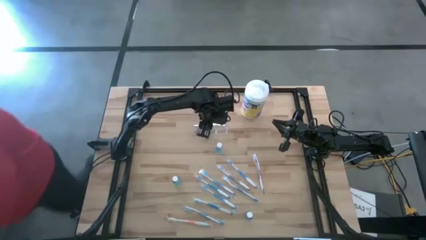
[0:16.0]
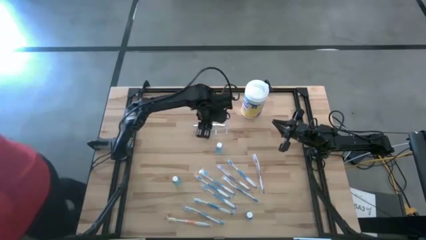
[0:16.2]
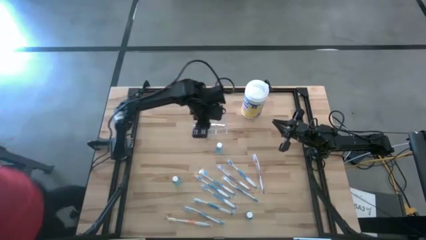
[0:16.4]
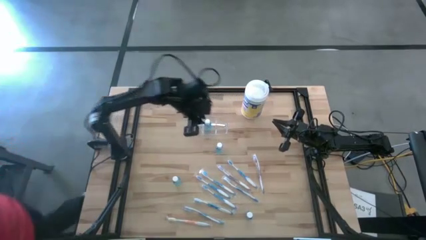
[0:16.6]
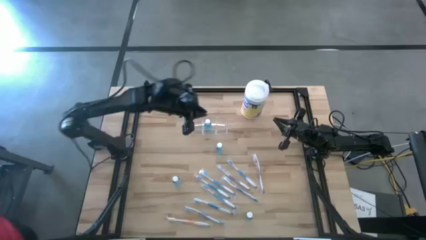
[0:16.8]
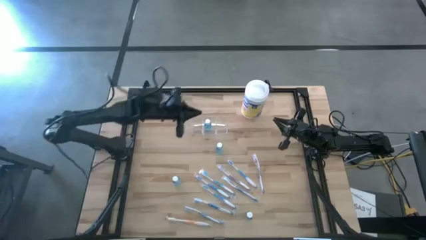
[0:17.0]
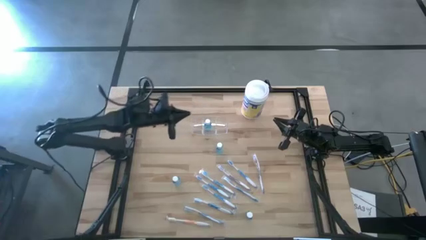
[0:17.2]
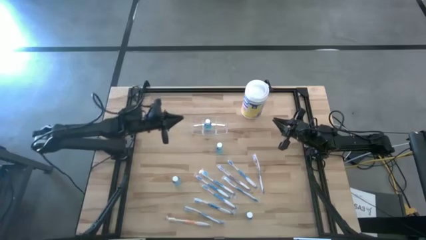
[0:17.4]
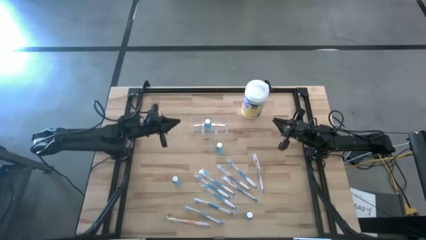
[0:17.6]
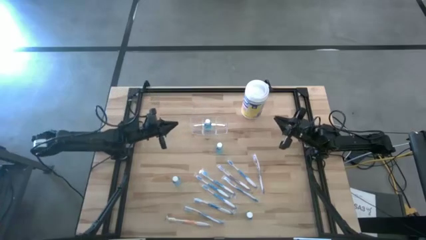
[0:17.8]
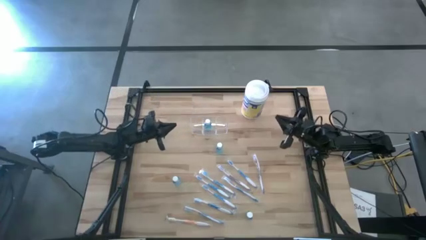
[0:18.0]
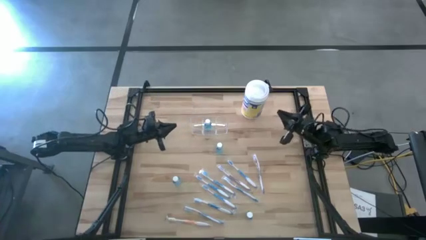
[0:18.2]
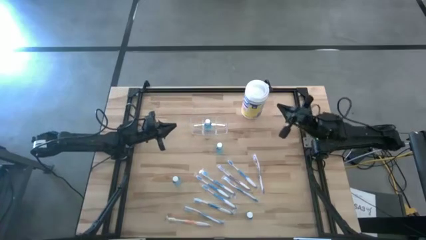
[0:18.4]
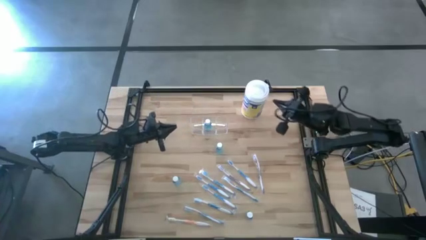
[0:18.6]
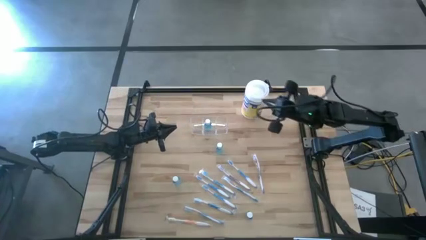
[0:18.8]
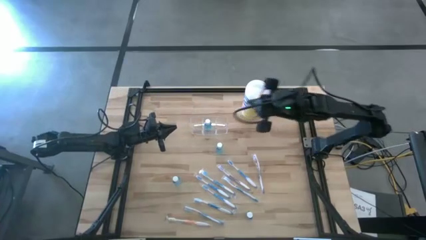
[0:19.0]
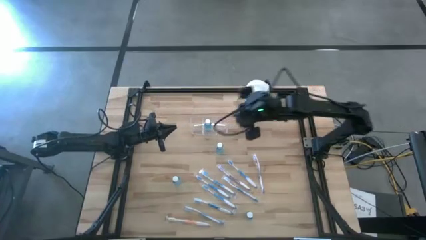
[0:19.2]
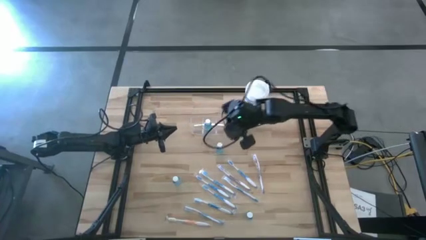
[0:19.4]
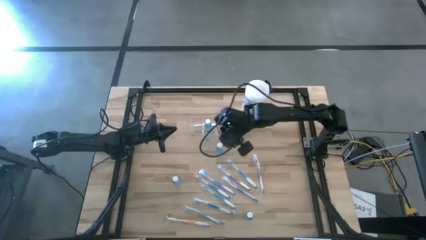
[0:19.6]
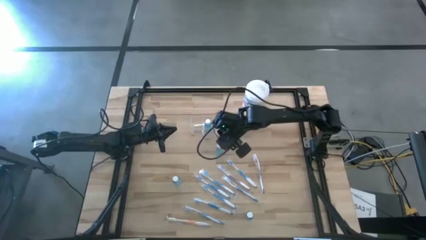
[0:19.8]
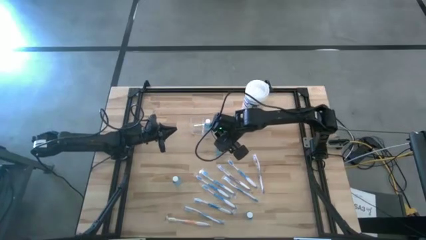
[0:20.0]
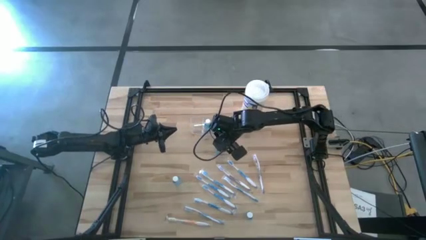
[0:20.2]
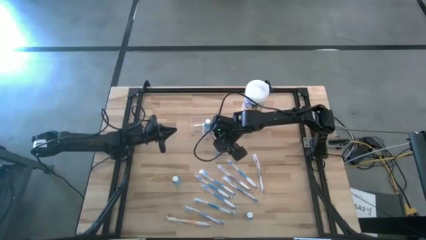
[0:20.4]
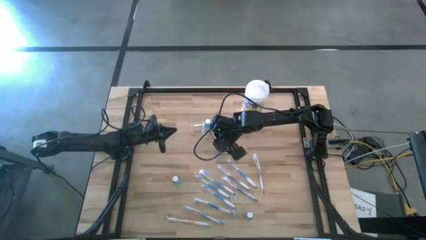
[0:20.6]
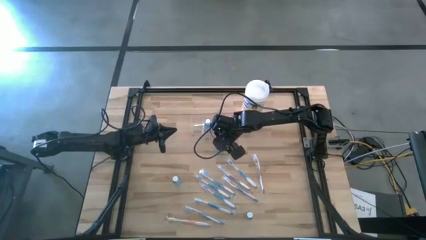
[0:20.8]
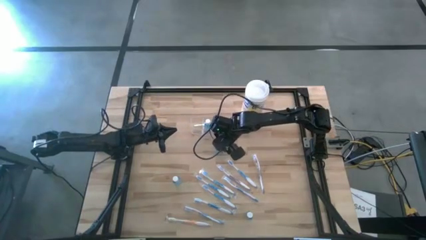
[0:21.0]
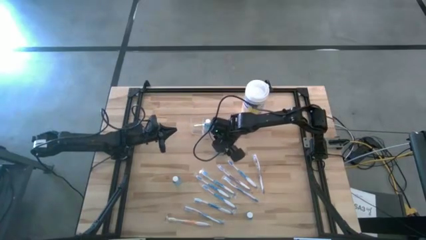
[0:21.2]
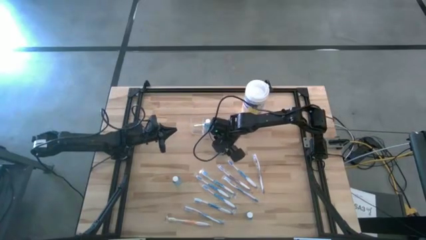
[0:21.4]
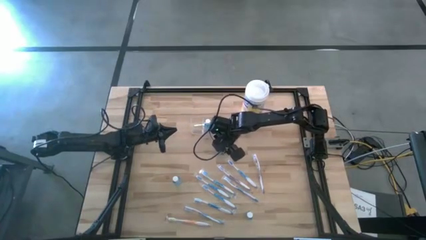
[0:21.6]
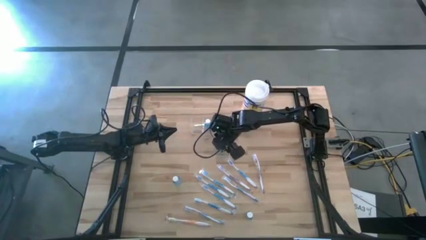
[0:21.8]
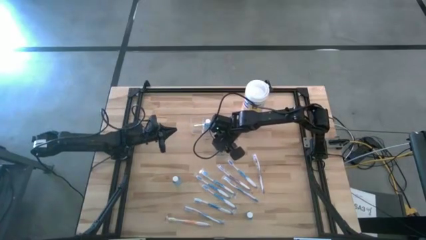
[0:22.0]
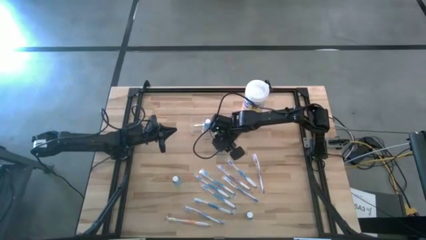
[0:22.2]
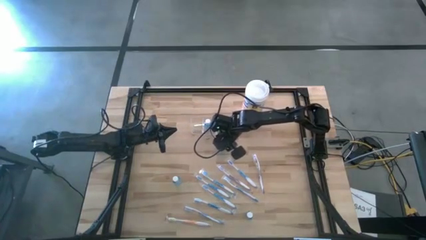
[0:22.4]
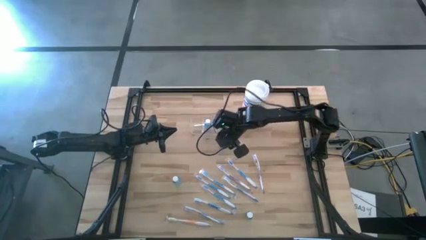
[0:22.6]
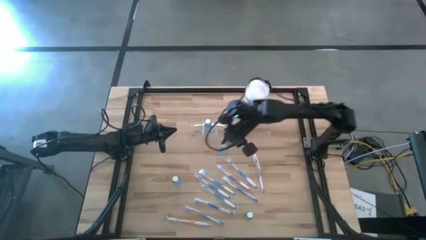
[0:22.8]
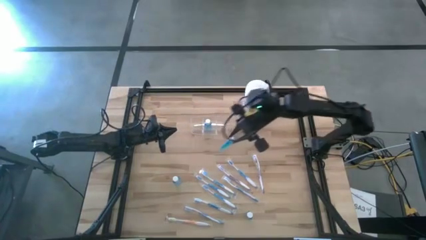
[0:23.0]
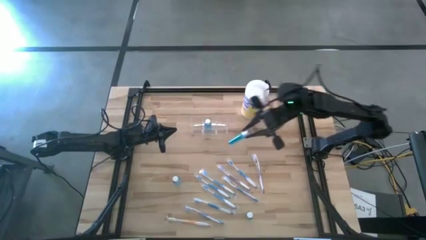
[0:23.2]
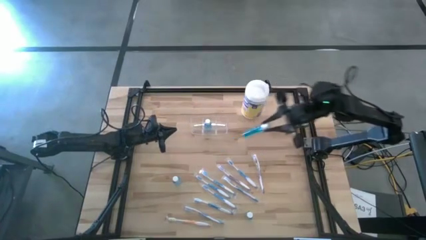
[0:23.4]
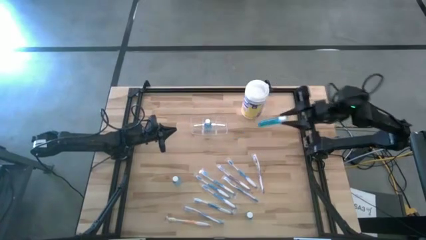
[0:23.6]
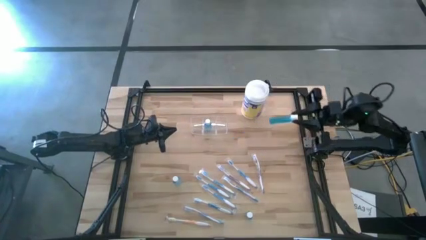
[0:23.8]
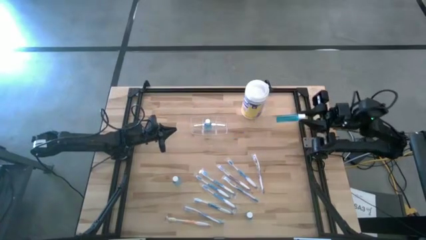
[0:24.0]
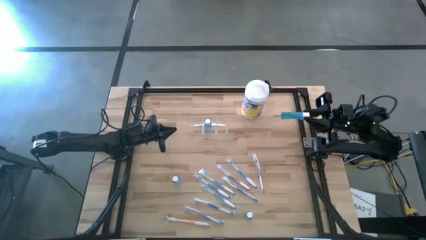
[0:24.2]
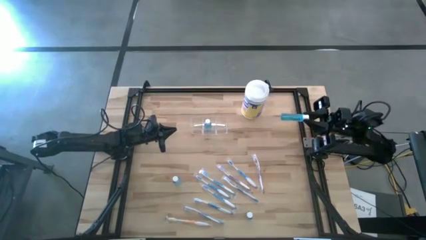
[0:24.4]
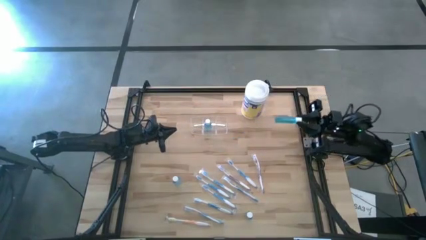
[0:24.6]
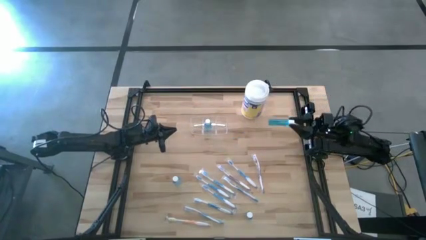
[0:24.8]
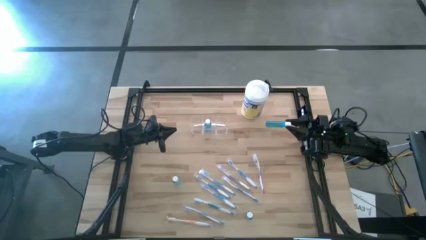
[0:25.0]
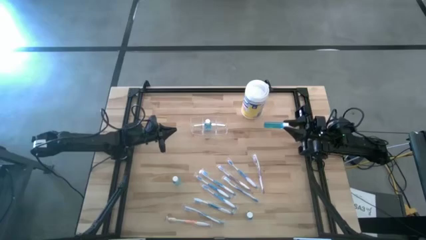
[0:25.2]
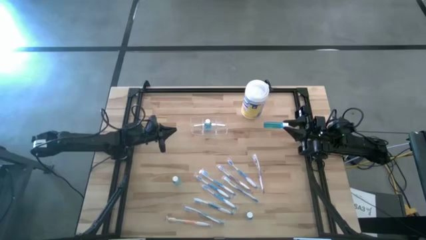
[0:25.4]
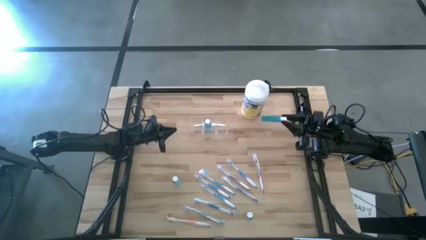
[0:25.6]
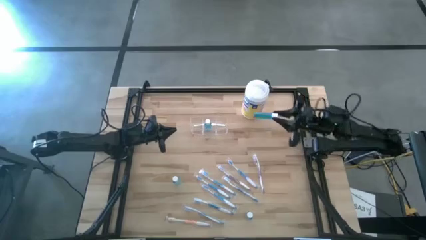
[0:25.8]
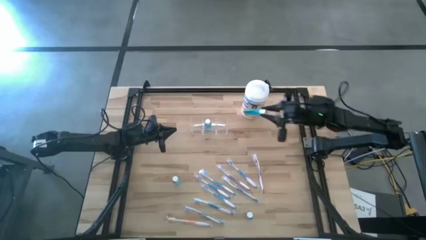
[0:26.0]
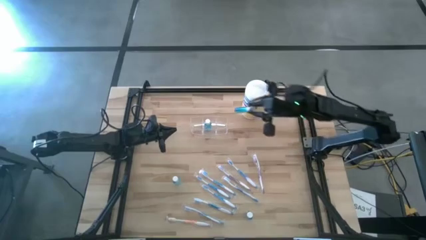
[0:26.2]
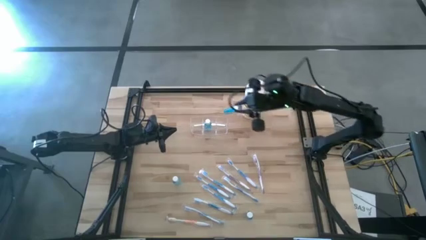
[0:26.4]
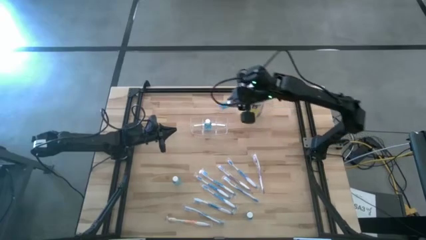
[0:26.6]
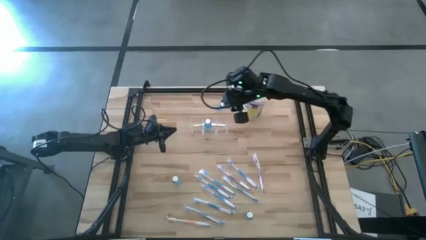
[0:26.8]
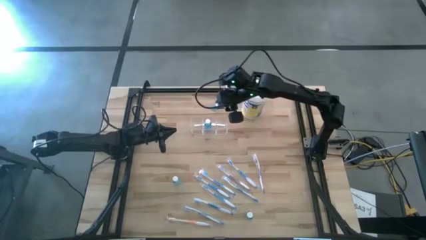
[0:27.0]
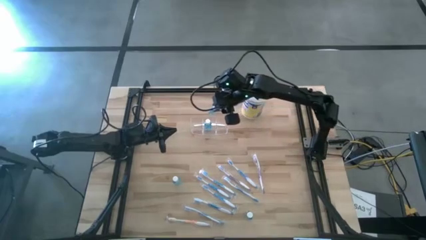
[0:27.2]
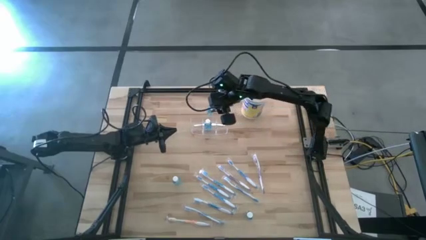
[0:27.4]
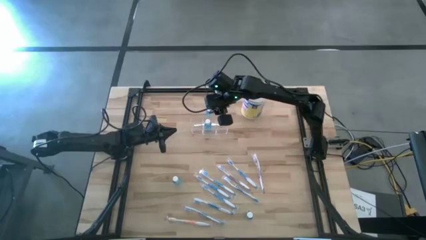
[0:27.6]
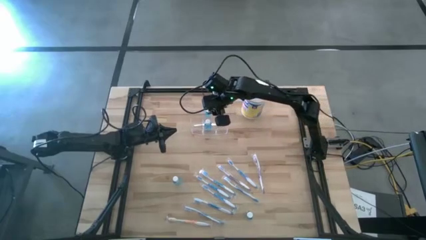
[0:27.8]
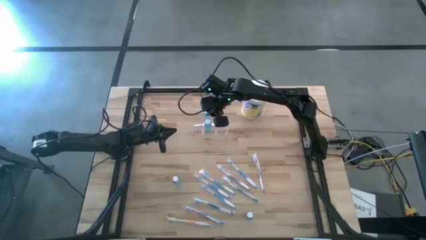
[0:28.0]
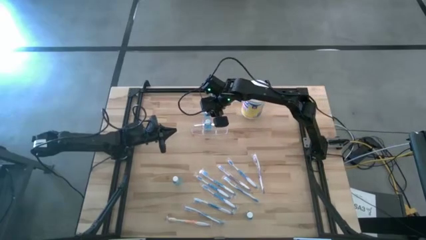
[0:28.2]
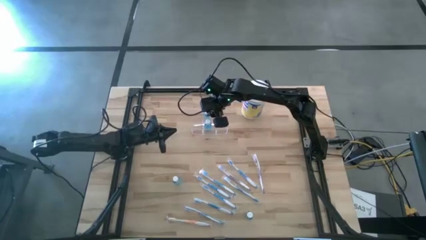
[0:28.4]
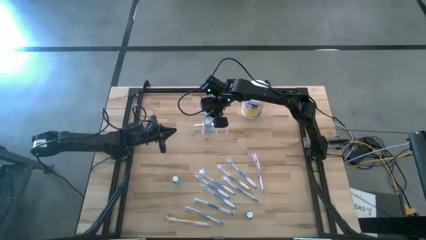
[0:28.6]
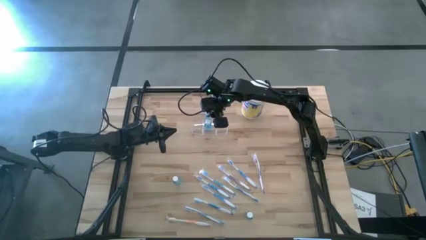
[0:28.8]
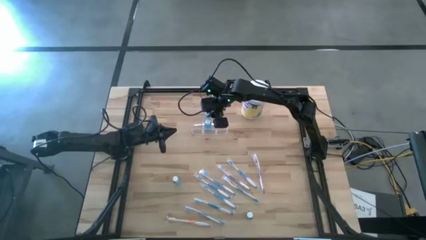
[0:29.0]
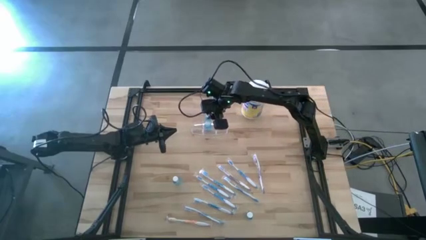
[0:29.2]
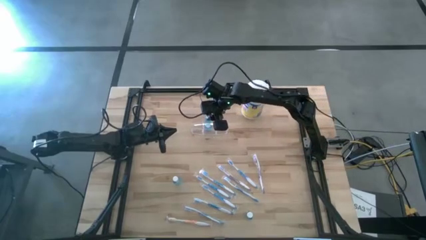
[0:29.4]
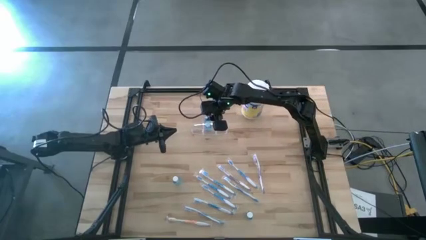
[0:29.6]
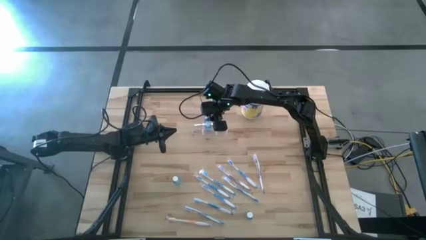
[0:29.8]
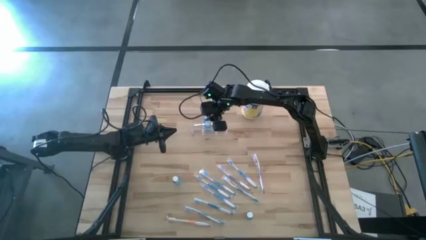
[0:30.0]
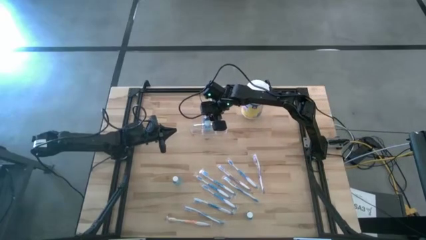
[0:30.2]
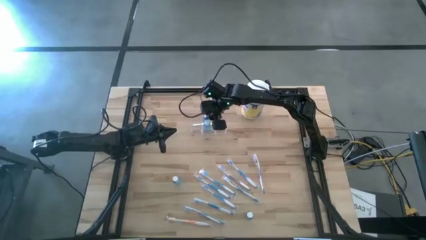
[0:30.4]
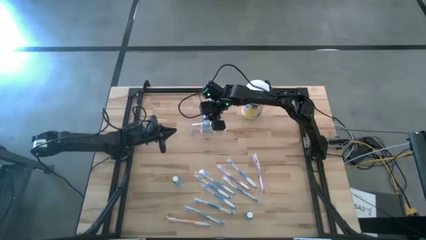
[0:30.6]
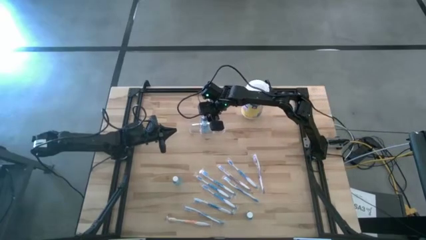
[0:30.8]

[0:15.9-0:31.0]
Task: Pick & Place toothbrushing station
Put the blue mouthwash into the middle section of the transparent organizer
